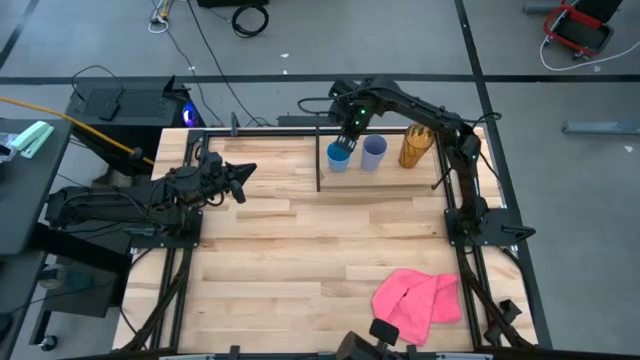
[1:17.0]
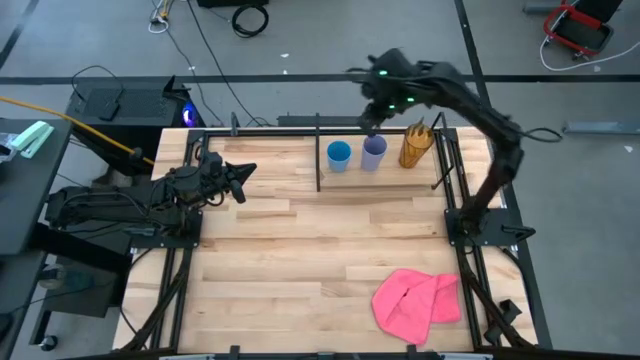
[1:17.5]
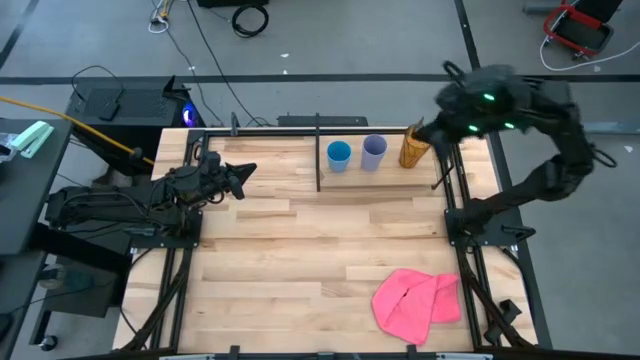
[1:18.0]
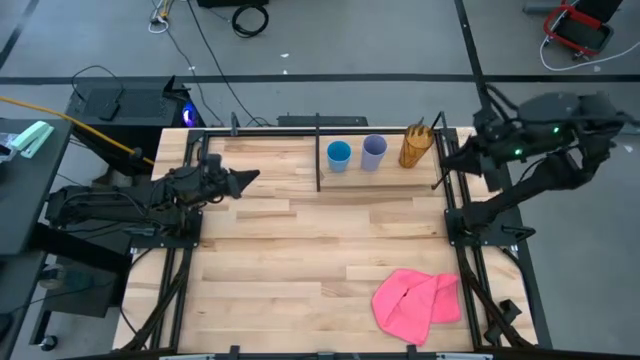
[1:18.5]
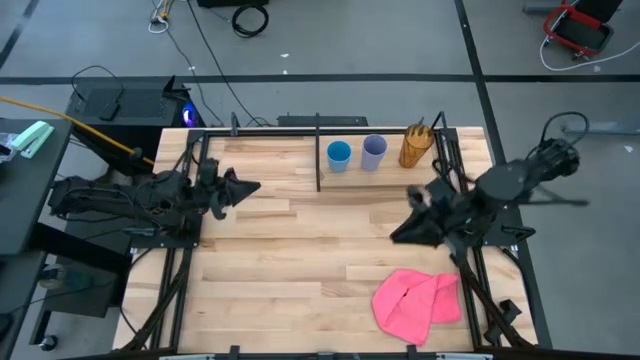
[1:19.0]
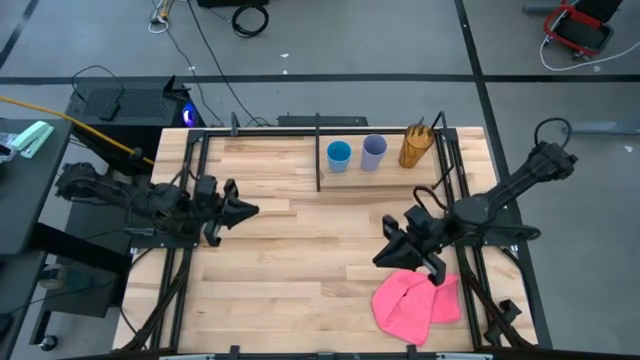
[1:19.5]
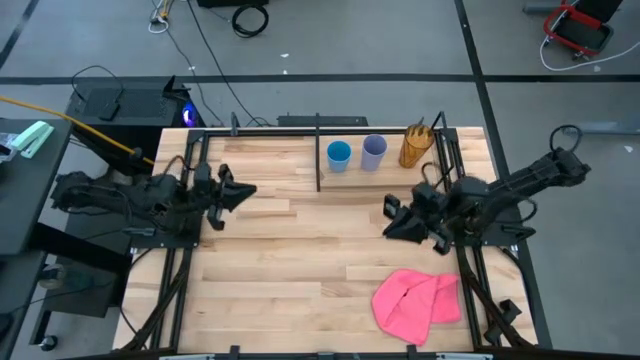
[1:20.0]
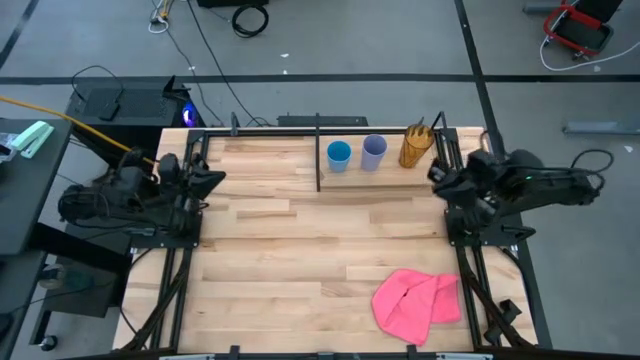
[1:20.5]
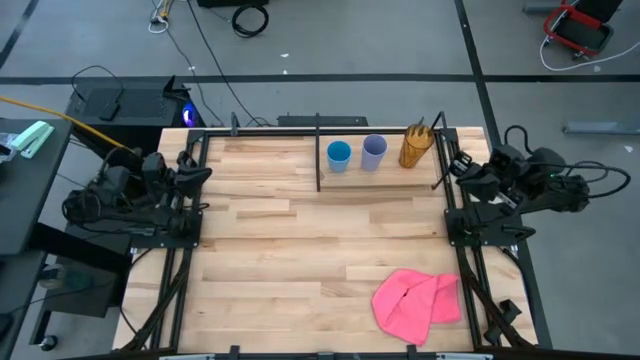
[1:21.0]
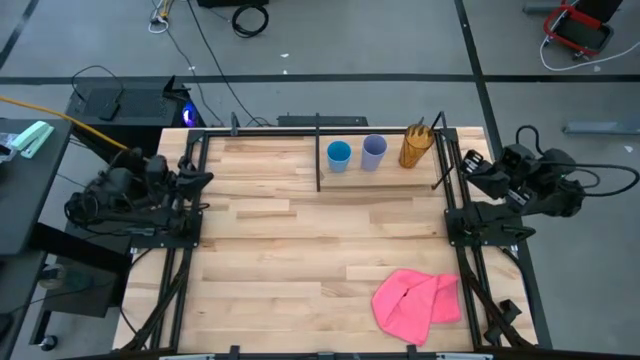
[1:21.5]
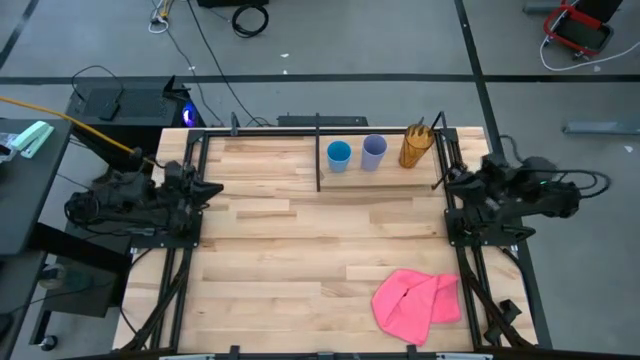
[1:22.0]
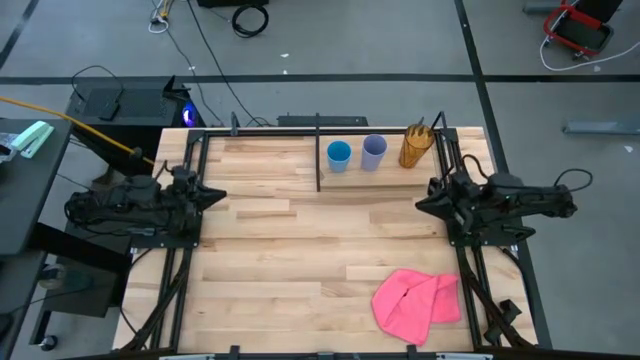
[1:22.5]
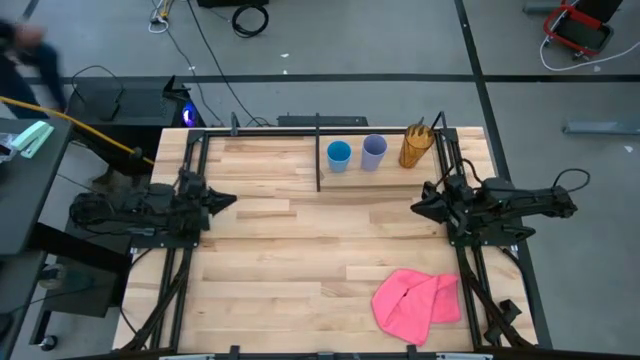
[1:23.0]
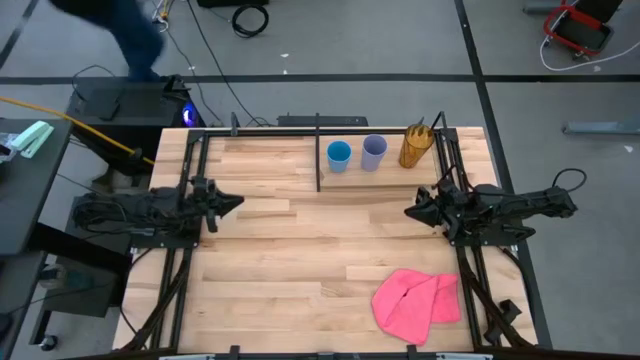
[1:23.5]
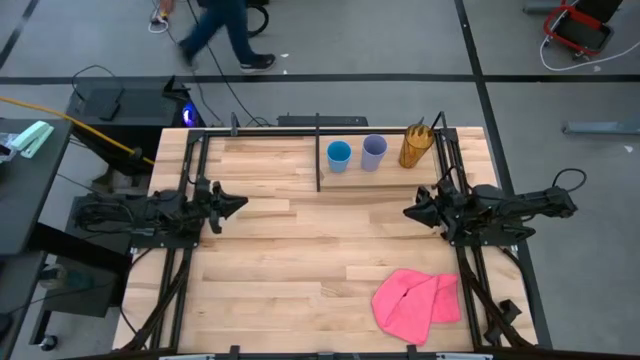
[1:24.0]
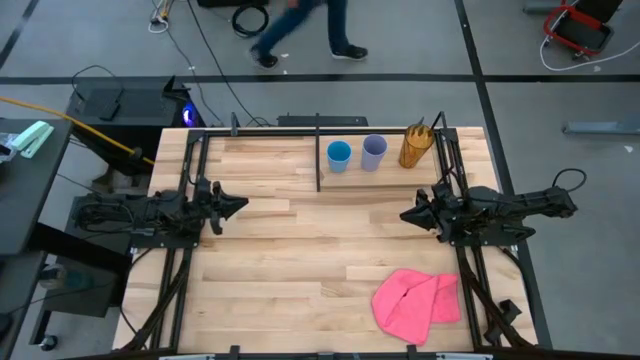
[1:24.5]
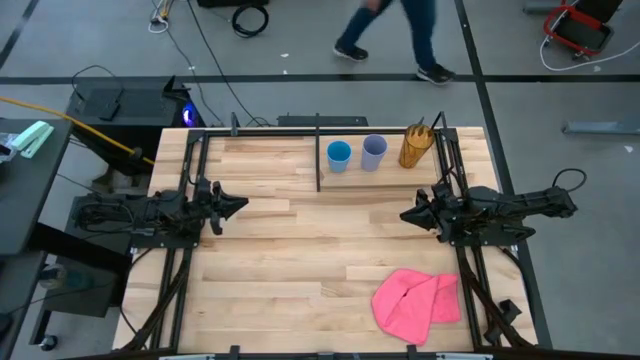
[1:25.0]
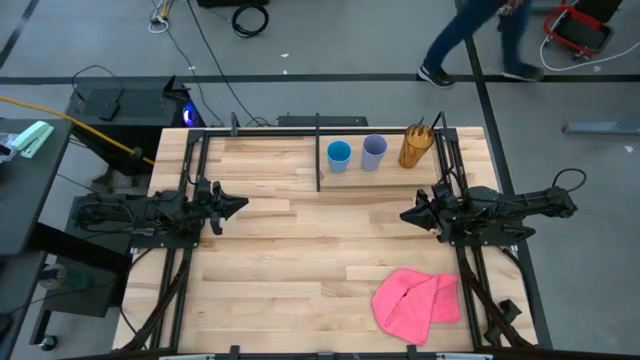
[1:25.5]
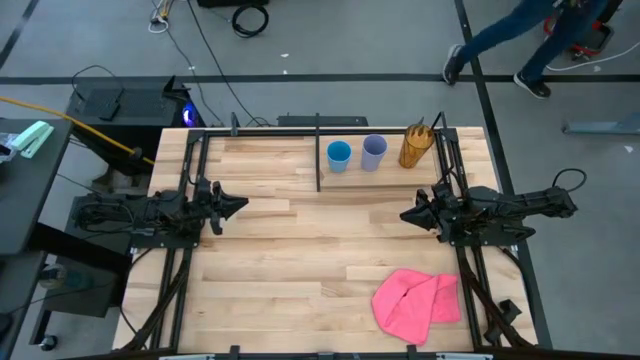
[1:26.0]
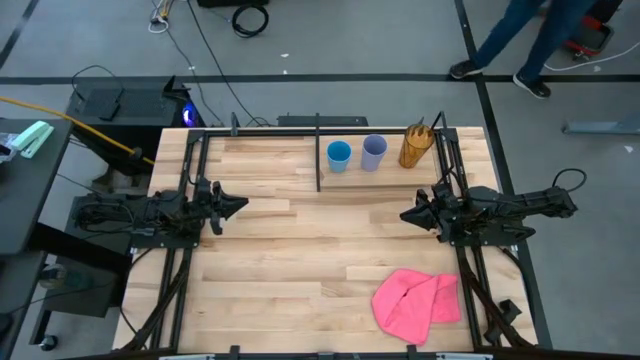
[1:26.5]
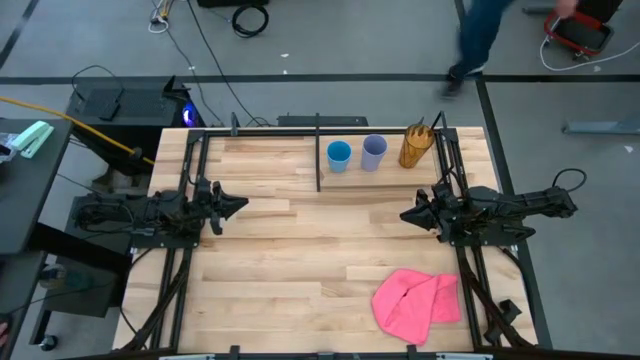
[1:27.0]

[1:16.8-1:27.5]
Task: Stack small to large cups/mugs on shelf
Return to Home Position

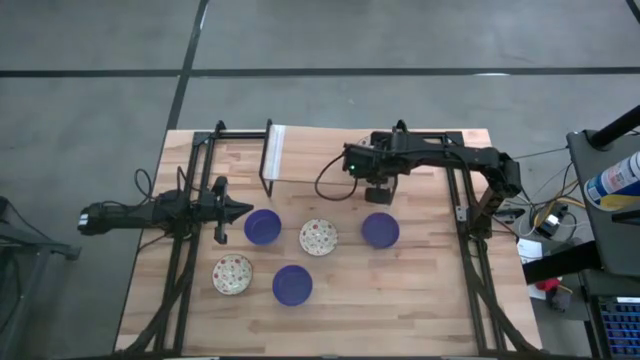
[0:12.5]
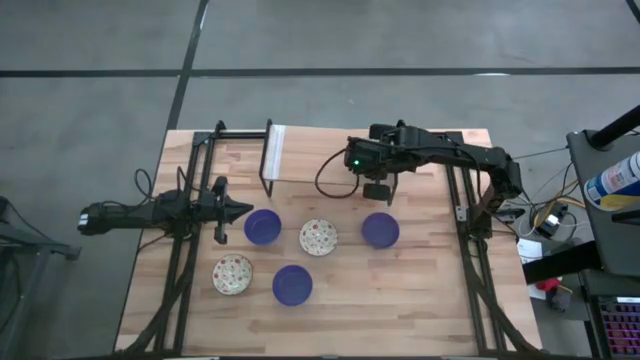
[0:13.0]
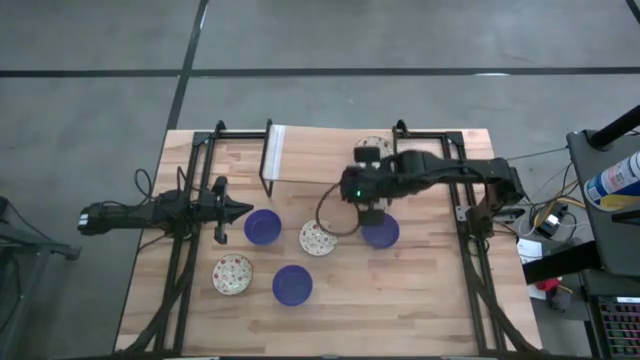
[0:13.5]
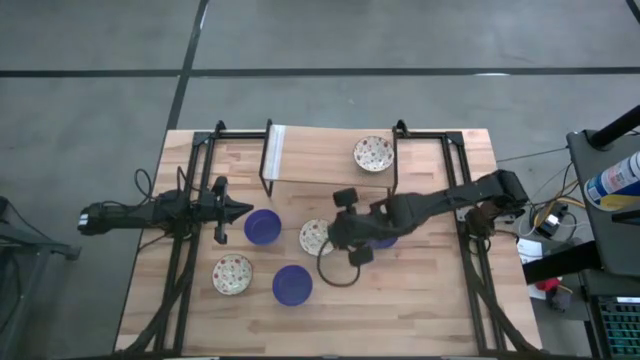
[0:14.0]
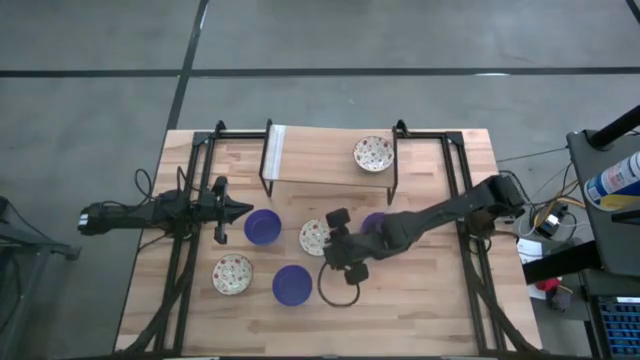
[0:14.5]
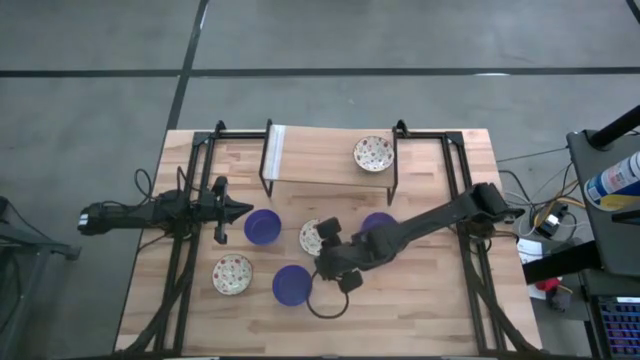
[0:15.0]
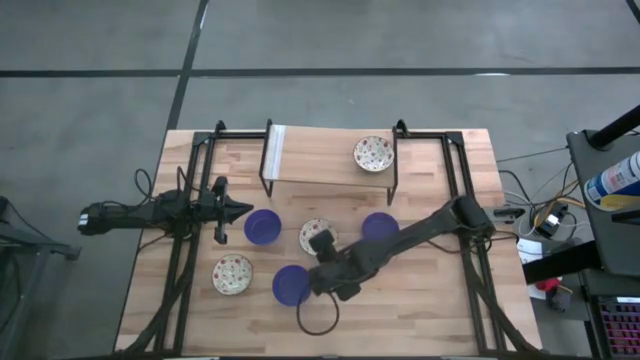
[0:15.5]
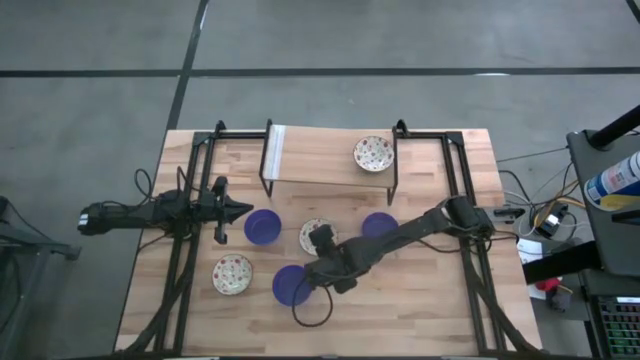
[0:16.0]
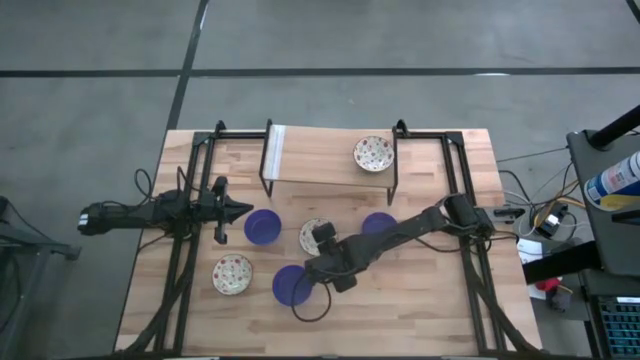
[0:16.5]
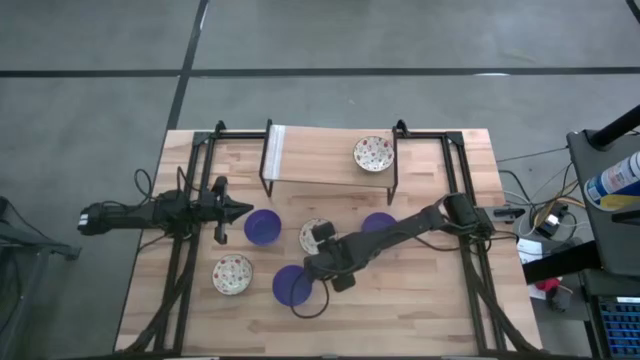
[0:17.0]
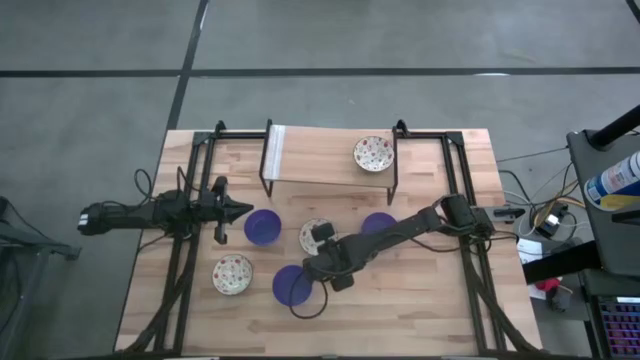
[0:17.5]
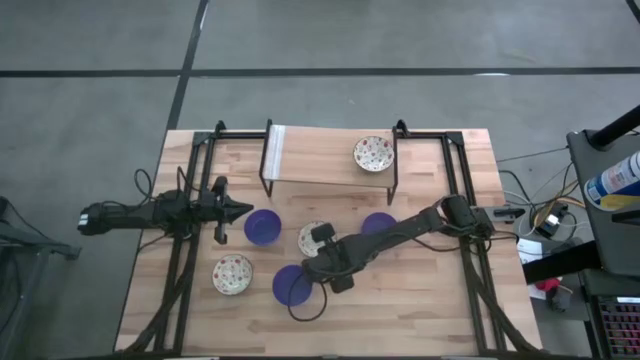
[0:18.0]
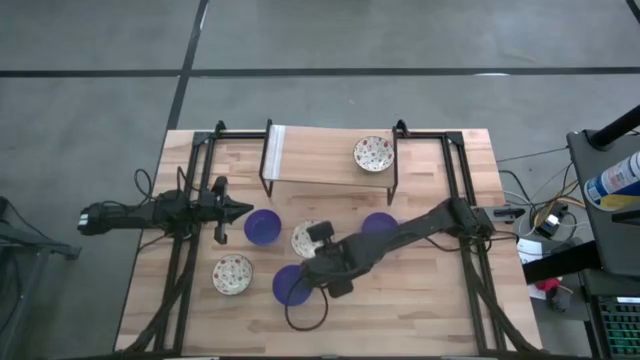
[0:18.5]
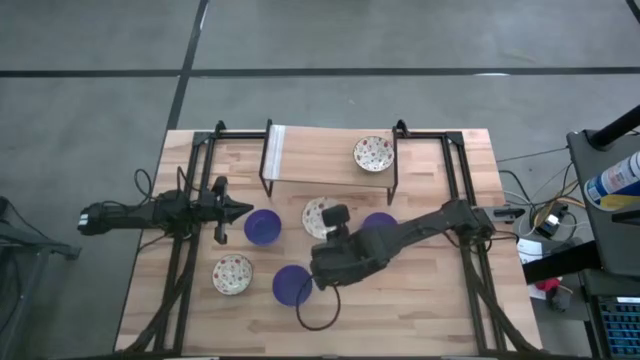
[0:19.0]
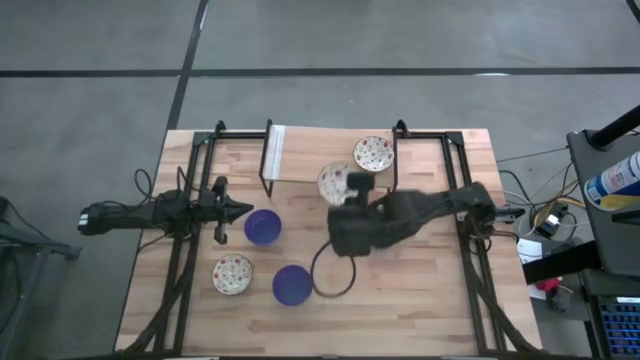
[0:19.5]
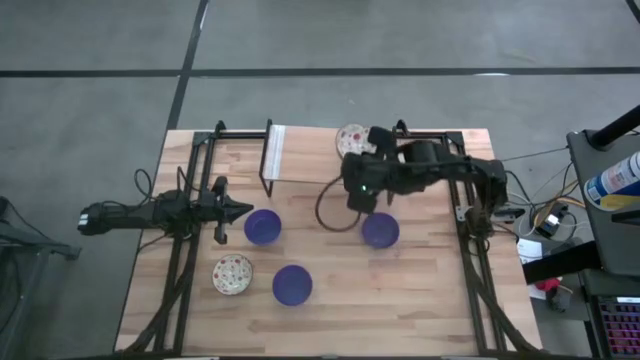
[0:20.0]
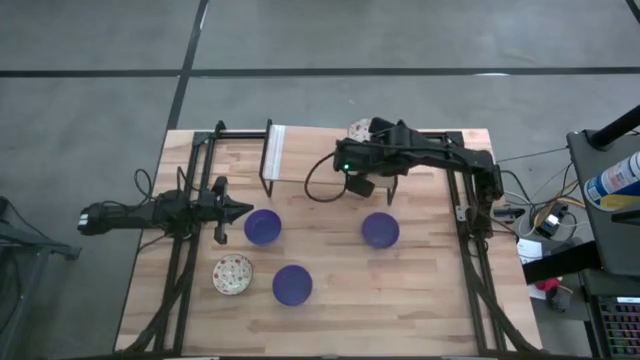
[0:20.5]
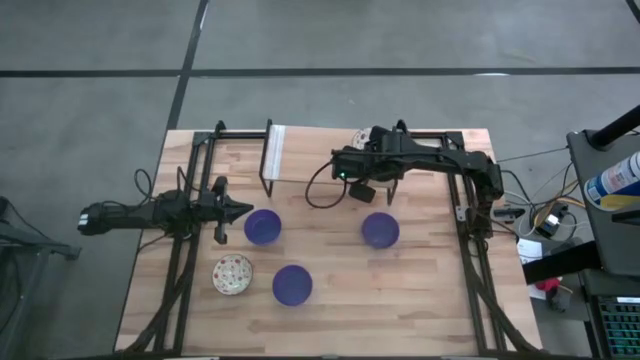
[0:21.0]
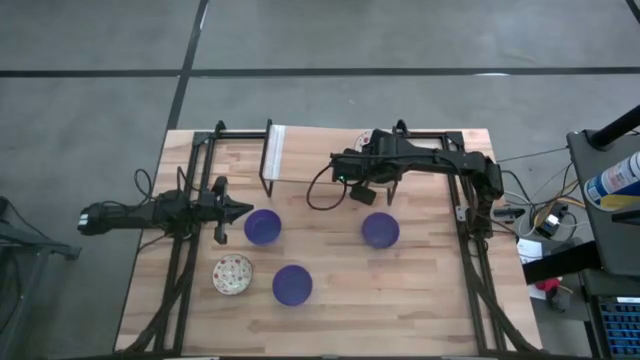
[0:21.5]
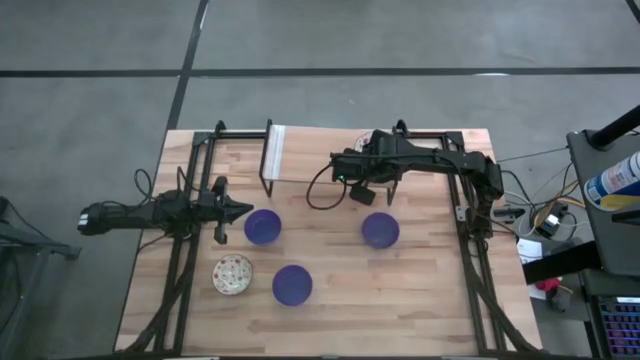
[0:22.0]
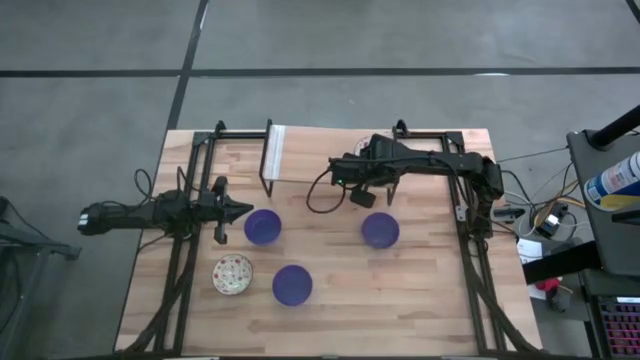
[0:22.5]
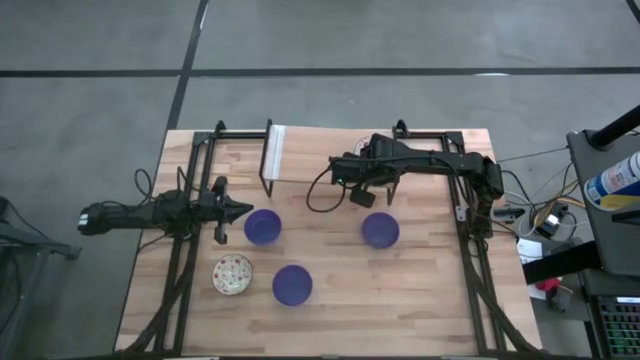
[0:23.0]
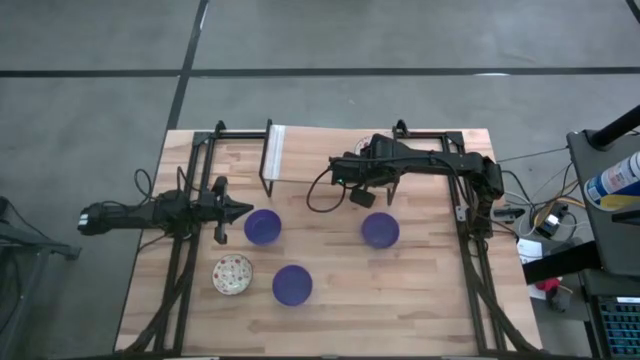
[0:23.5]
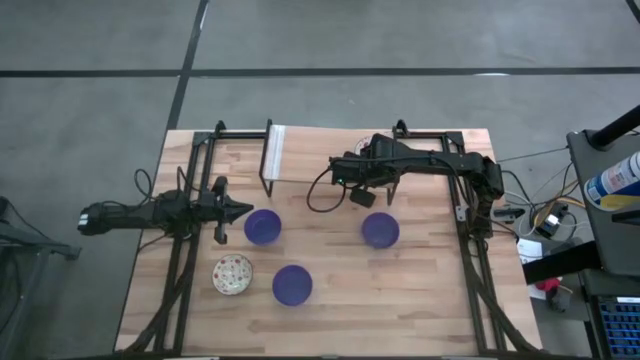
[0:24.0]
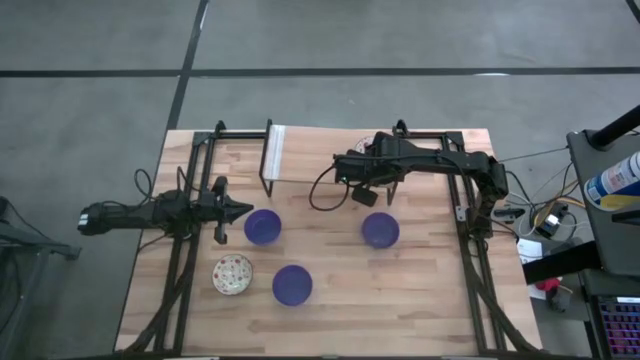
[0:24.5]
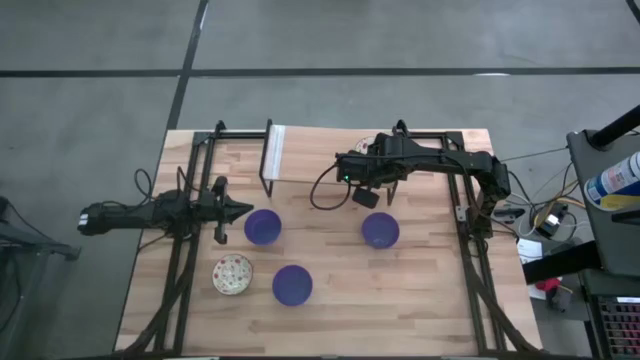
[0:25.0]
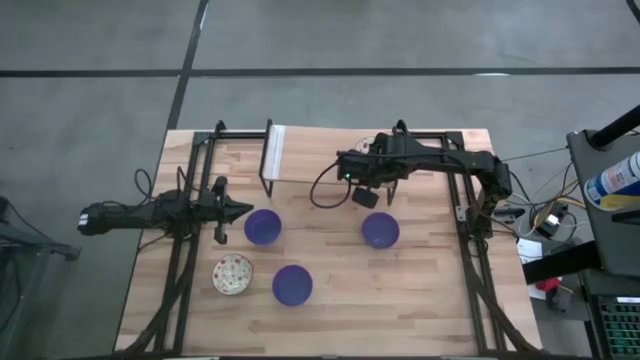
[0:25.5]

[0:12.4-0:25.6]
Task: Pick & Place Mini bowls
Stack the right white patterned bowl on top of the white patterned bowl on the shelf
